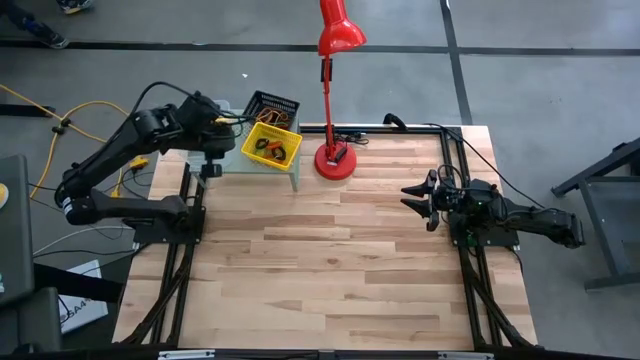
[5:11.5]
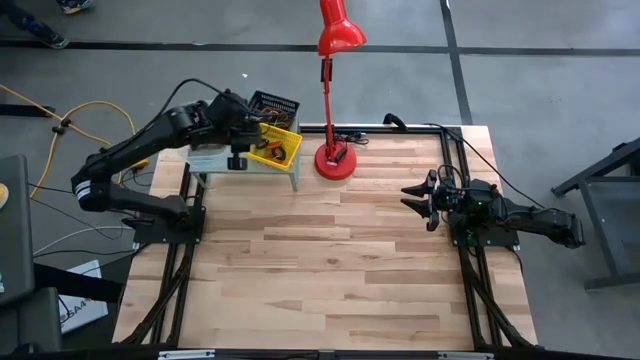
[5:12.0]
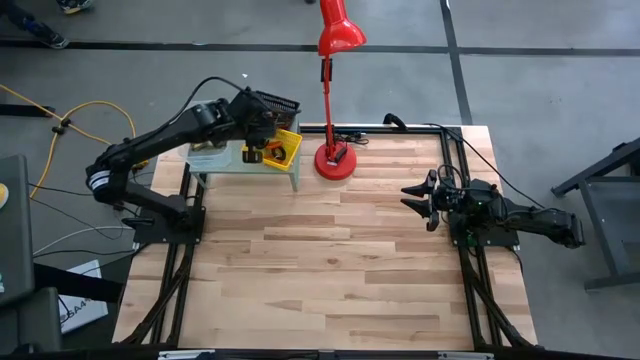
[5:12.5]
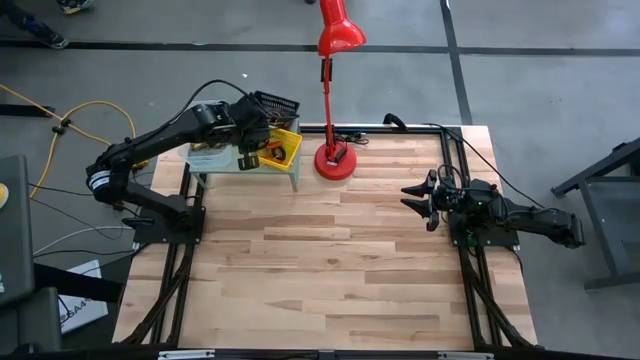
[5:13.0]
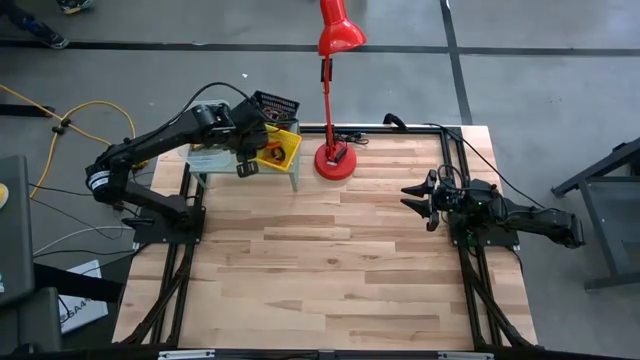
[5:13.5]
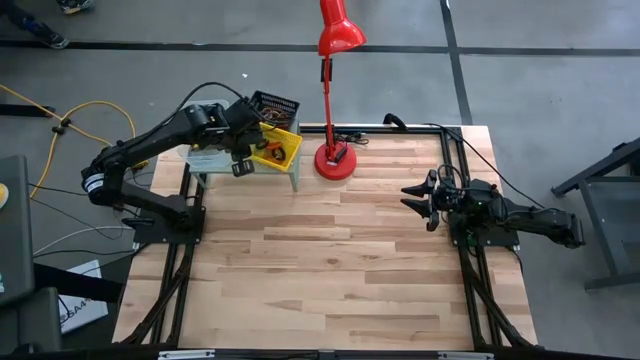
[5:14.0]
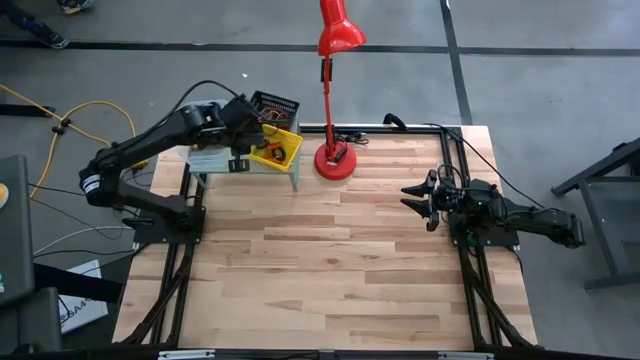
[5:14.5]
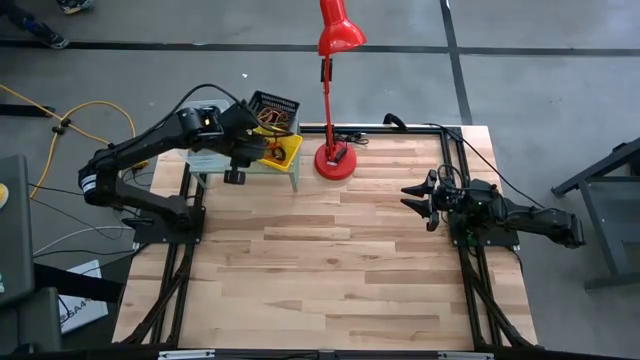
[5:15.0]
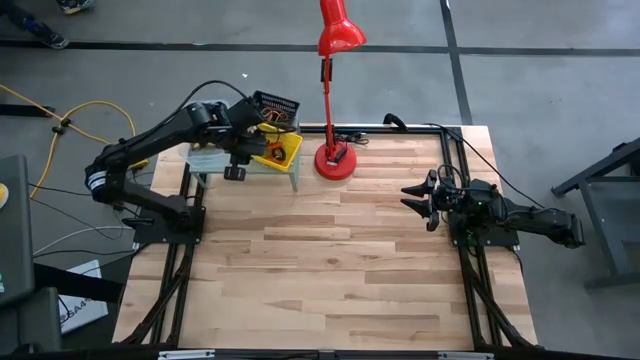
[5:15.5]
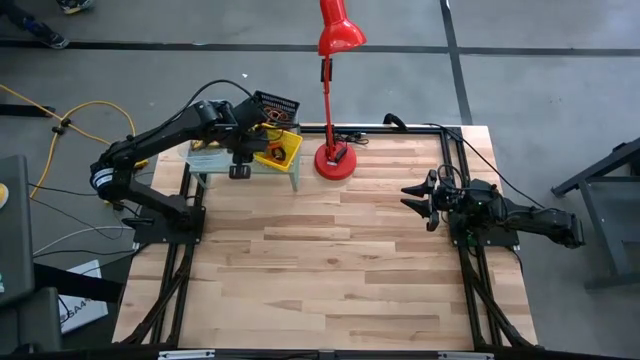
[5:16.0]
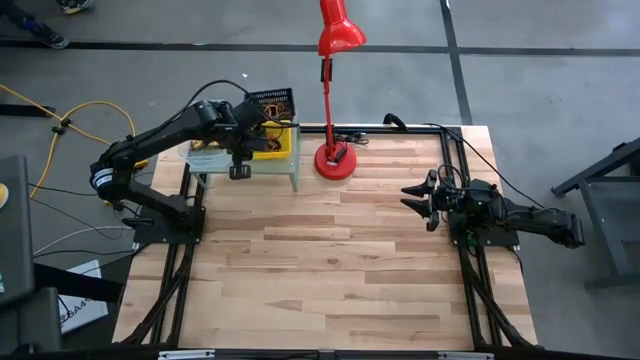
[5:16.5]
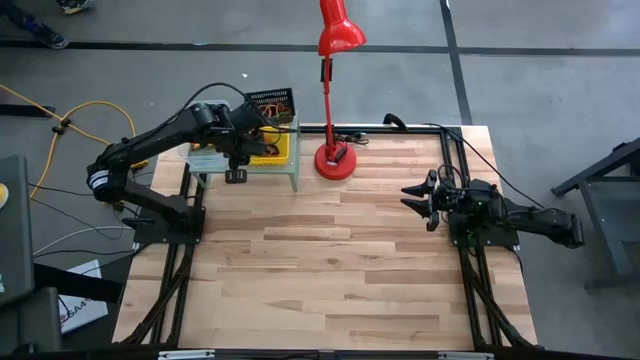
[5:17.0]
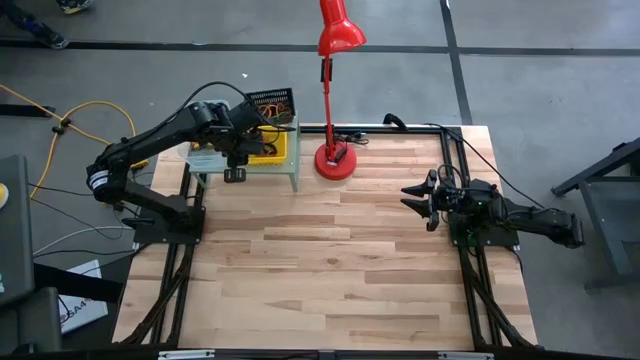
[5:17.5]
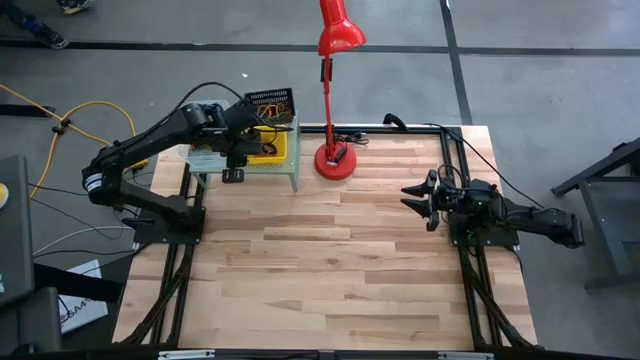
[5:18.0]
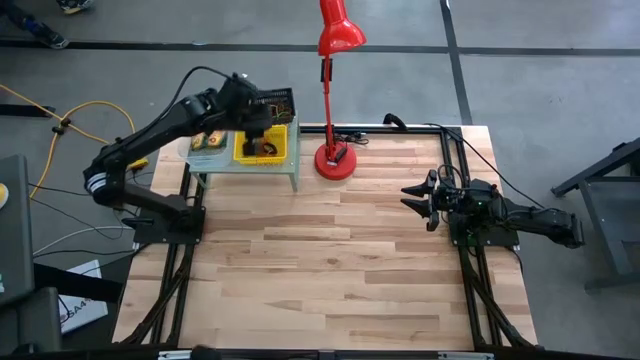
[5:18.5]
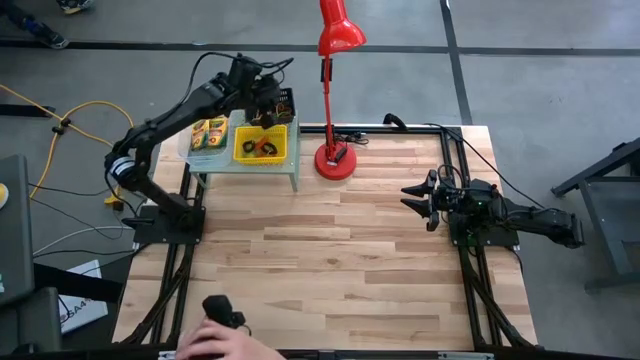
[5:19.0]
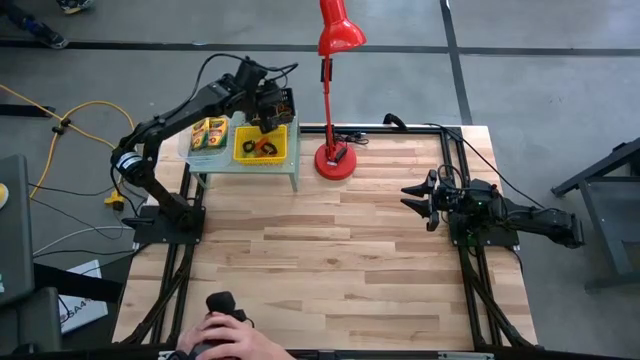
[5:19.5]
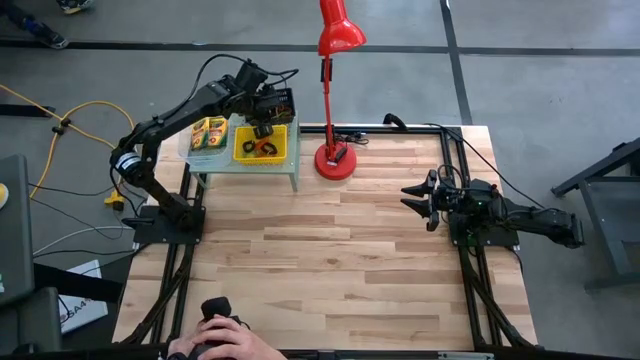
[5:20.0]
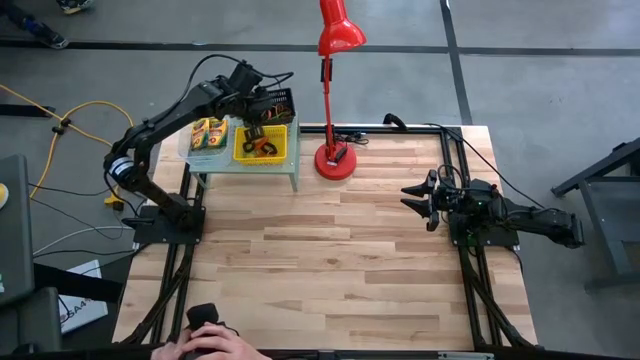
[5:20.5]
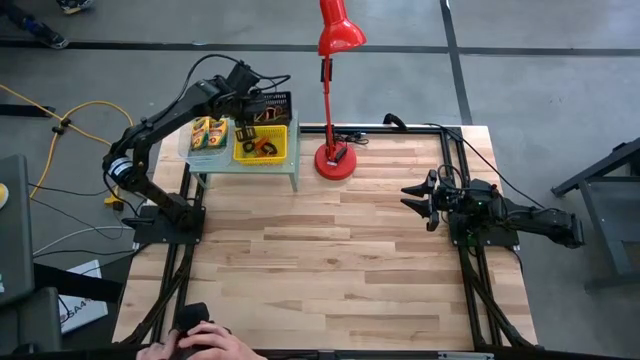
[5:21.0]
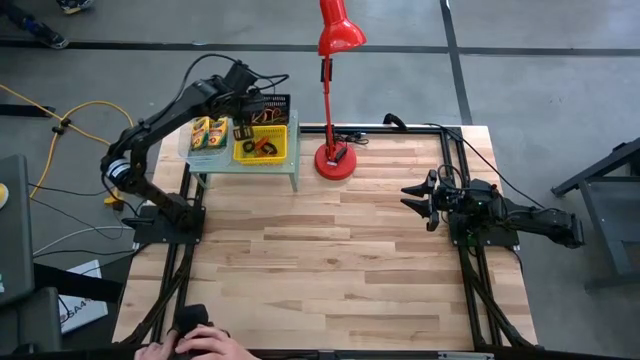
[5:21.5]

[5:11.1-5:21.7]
Task: Pick & Place Office Desk Supplies
Adjust the bins on the shelf

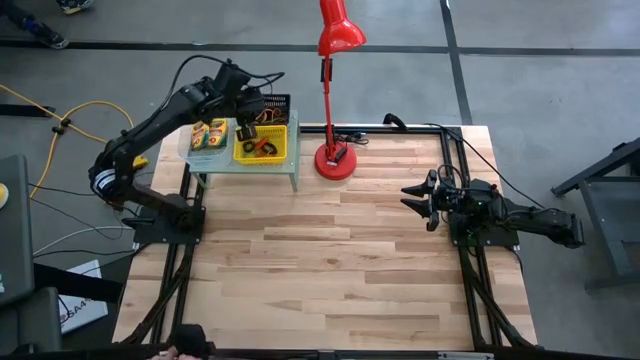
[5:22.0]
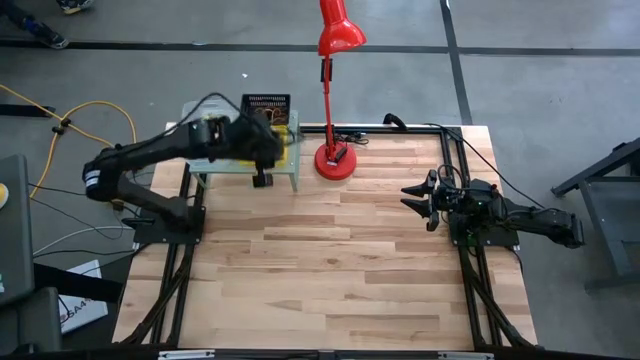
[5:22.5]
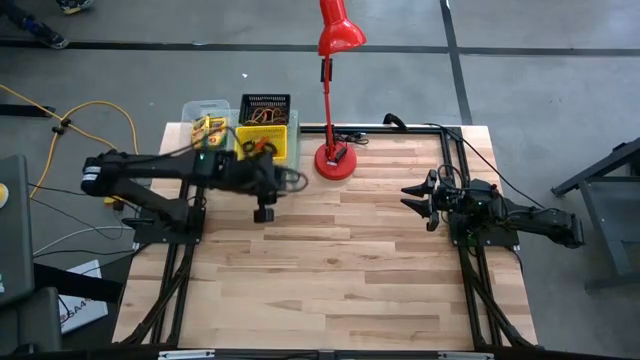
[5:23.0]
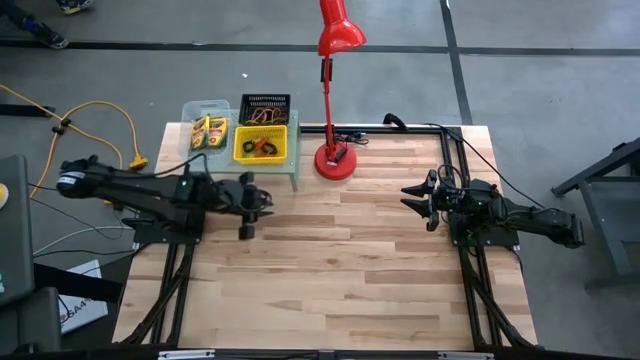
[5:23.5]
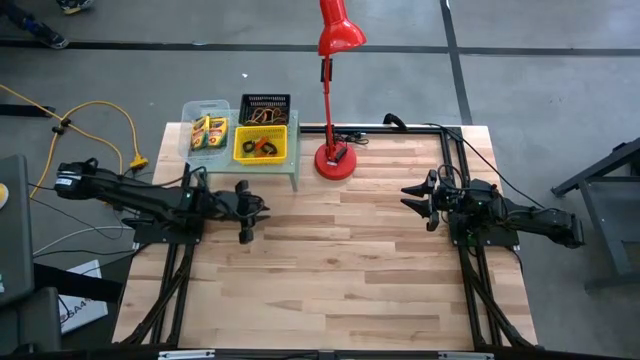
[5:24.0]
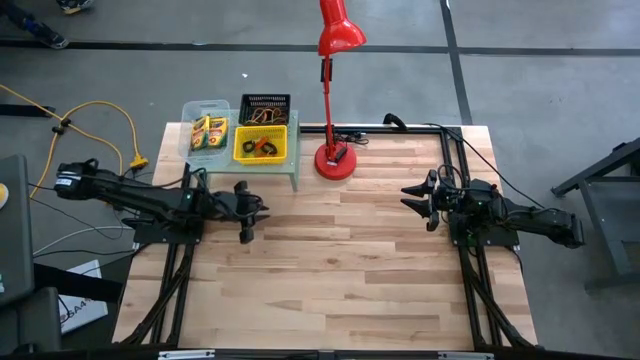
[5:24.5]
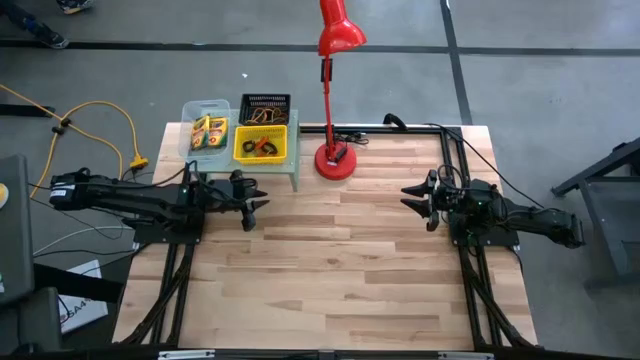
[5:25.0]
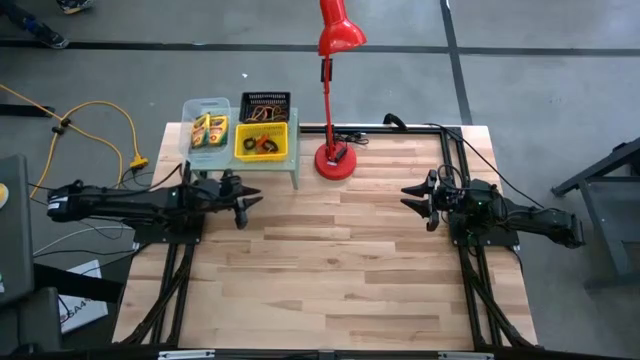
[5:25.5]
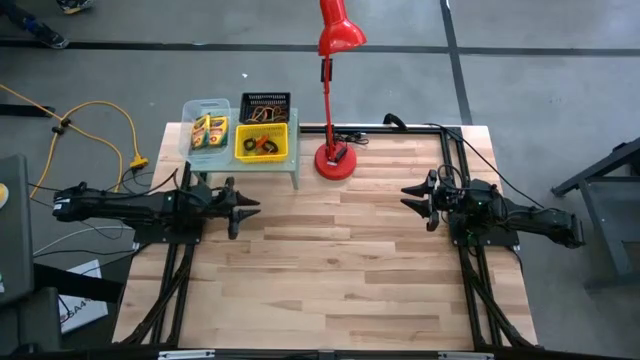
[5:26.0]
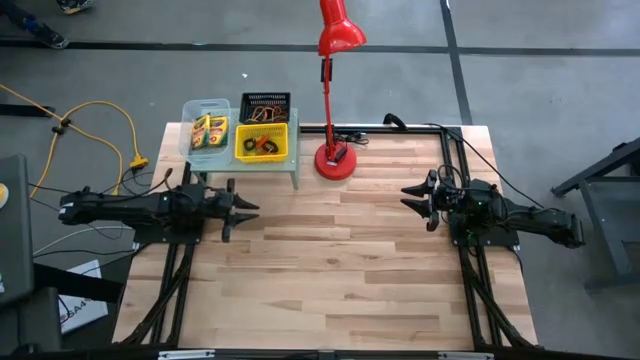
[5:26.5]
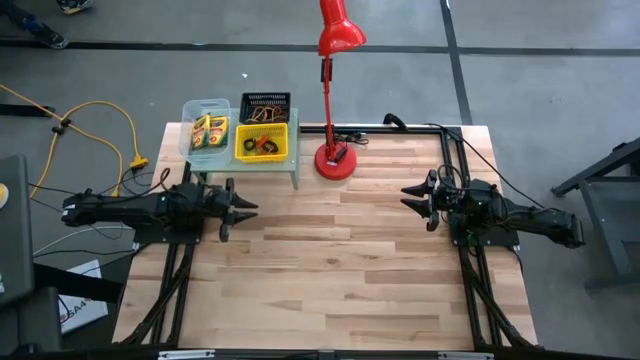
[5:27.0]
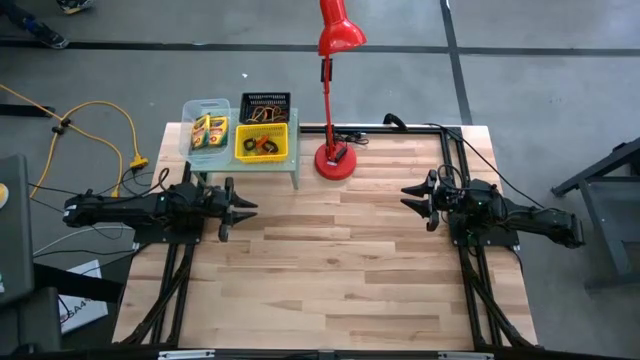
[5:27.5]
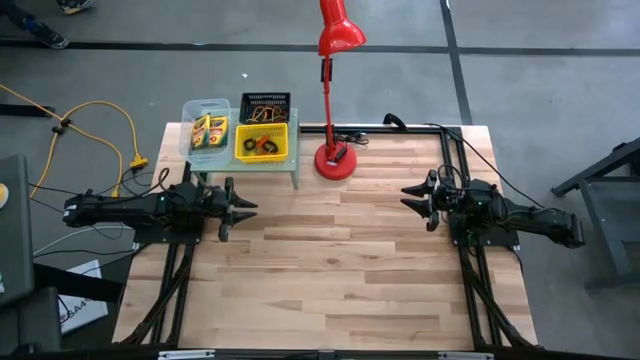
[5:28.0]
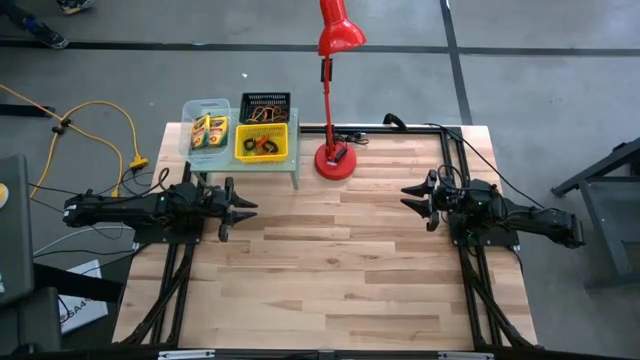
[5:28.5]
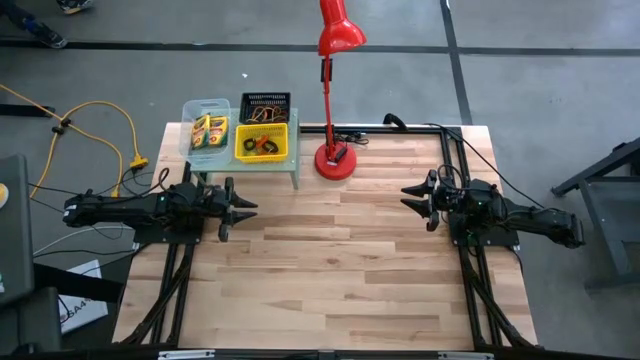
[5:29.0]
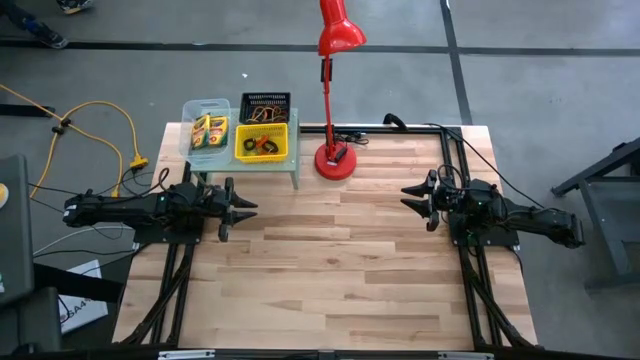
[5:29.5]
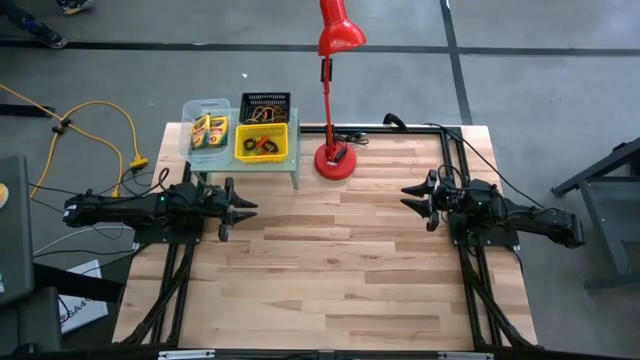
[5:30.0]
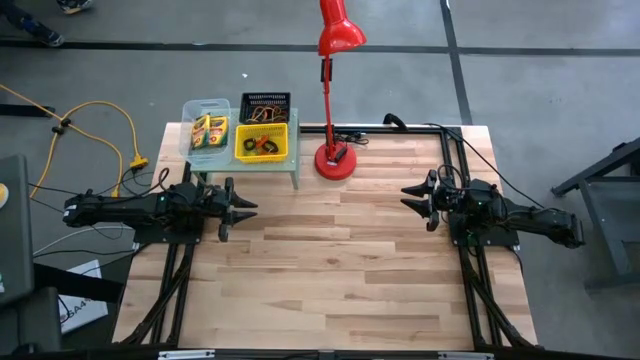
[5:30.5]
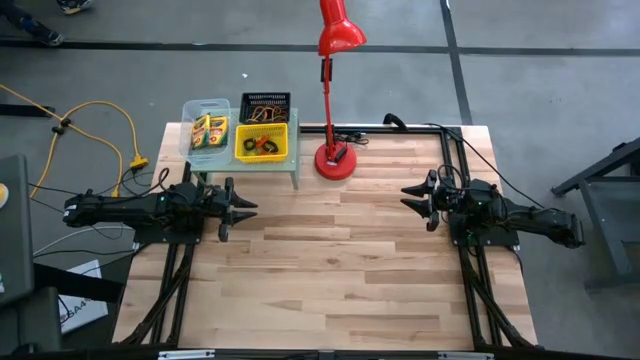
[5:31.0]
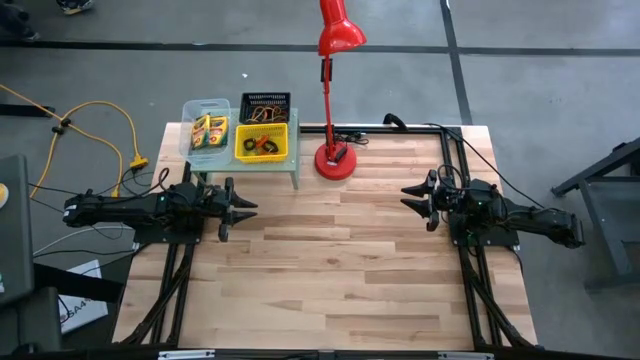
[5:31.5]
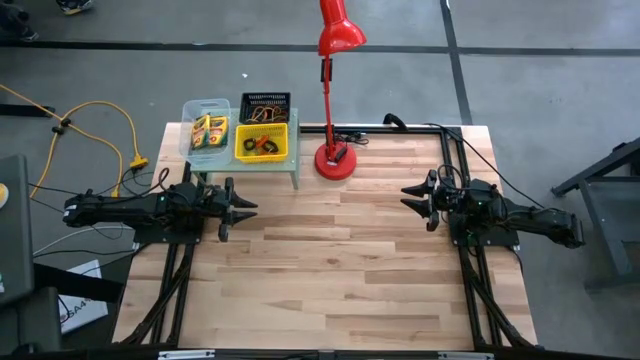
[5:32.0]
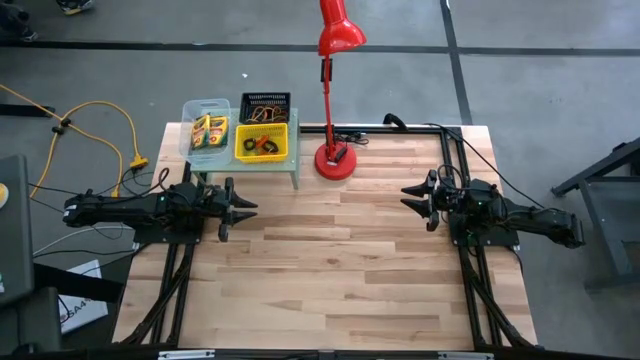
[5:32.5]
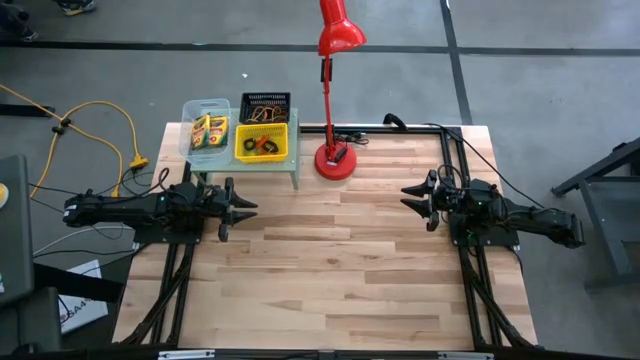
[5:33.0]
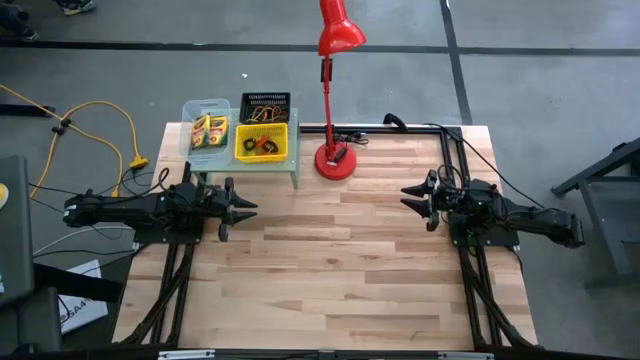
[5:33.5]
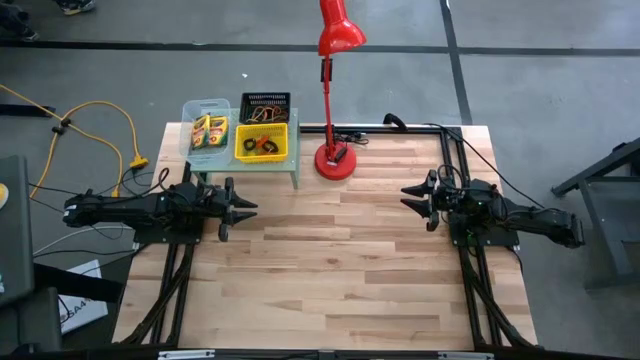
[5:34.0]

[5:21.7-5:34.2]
Return to Home Position
